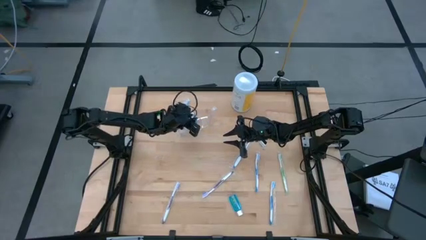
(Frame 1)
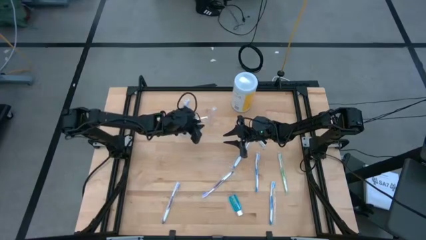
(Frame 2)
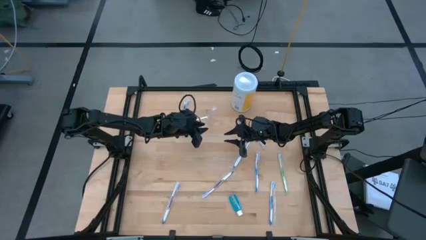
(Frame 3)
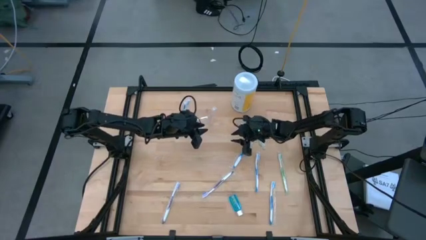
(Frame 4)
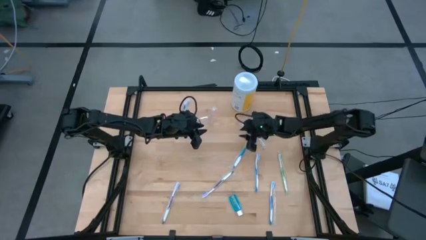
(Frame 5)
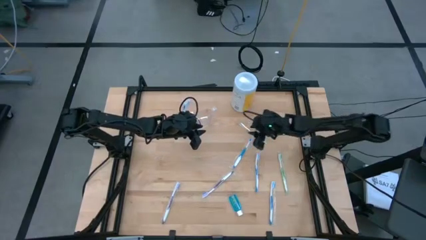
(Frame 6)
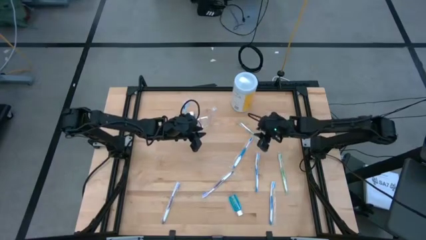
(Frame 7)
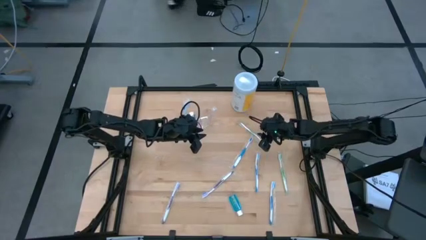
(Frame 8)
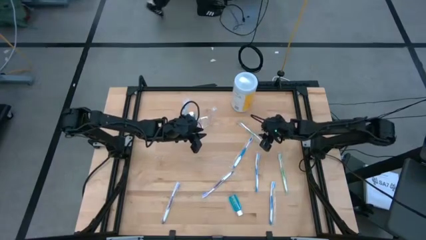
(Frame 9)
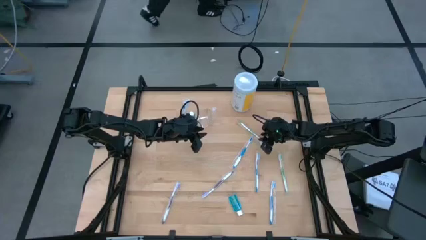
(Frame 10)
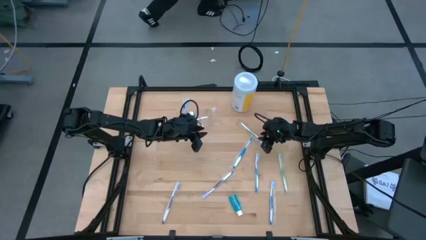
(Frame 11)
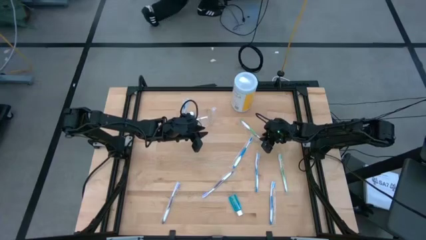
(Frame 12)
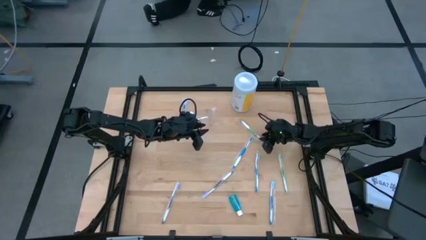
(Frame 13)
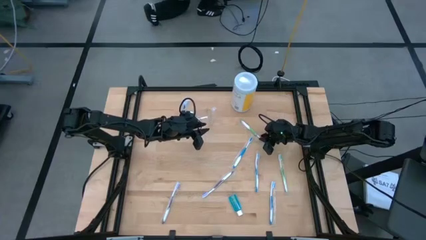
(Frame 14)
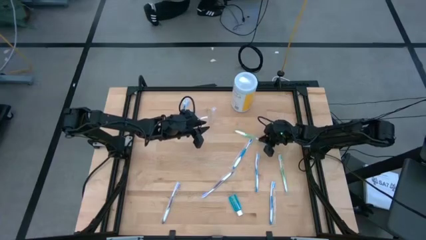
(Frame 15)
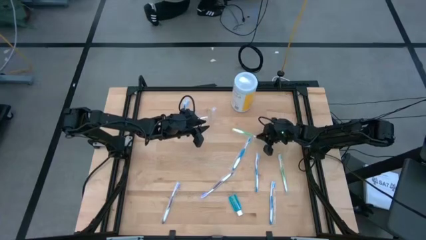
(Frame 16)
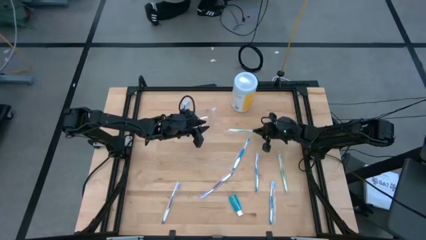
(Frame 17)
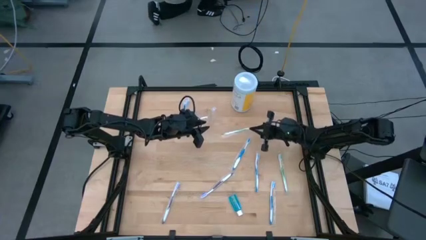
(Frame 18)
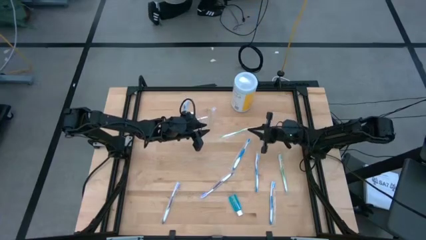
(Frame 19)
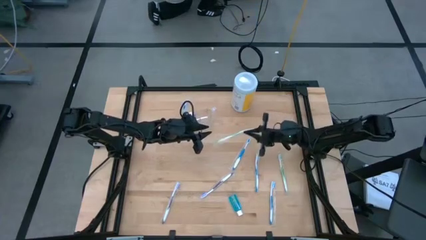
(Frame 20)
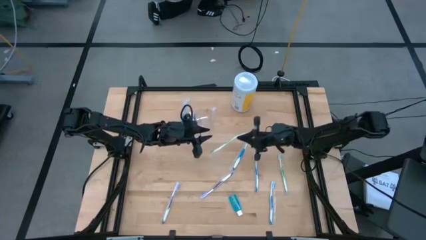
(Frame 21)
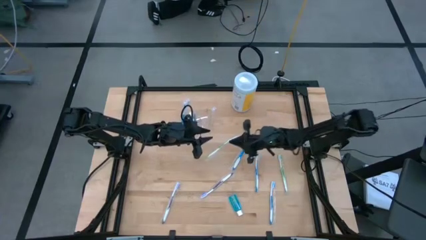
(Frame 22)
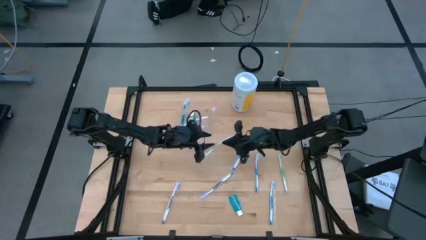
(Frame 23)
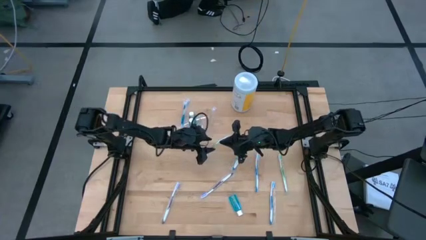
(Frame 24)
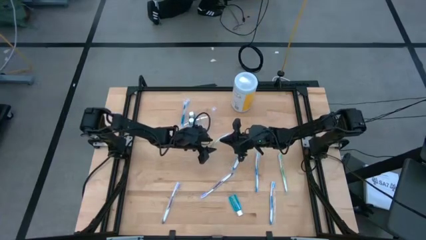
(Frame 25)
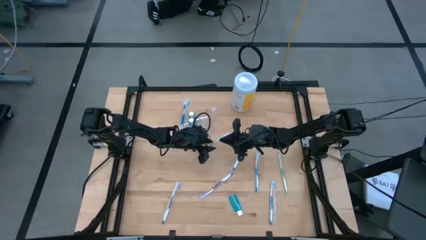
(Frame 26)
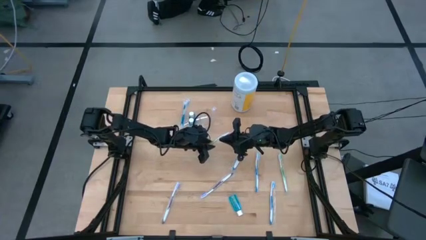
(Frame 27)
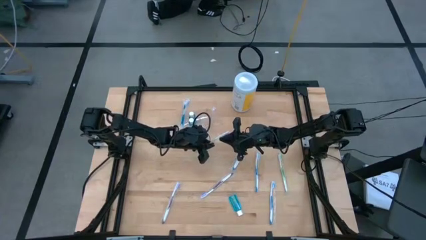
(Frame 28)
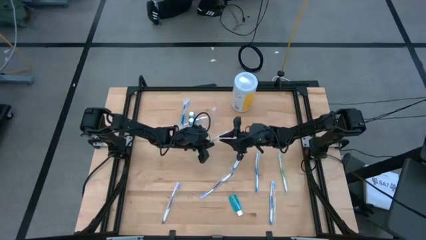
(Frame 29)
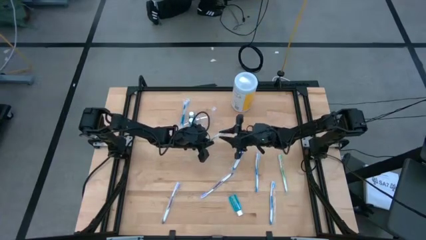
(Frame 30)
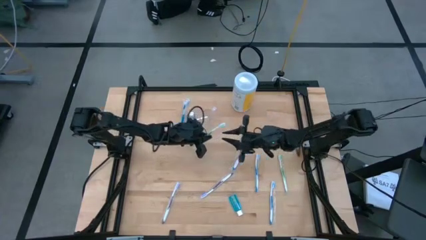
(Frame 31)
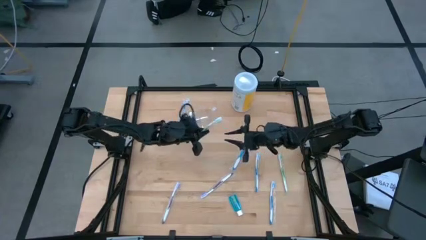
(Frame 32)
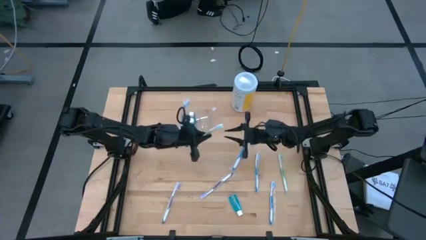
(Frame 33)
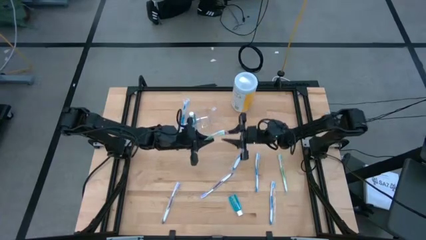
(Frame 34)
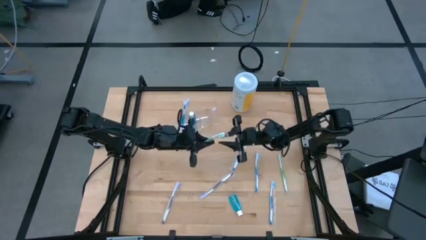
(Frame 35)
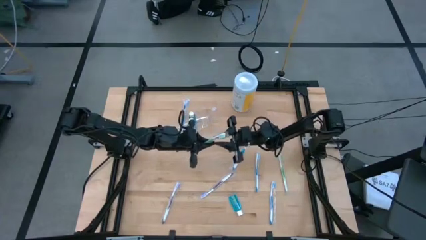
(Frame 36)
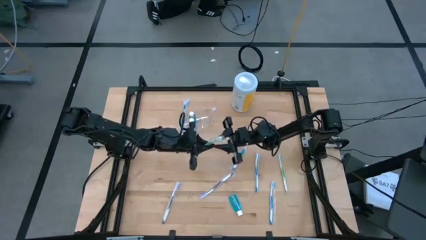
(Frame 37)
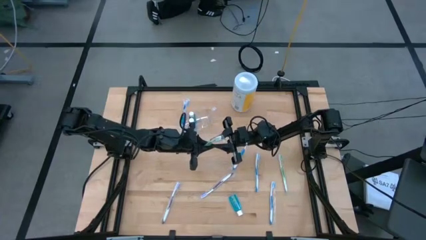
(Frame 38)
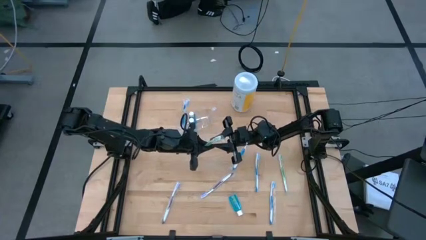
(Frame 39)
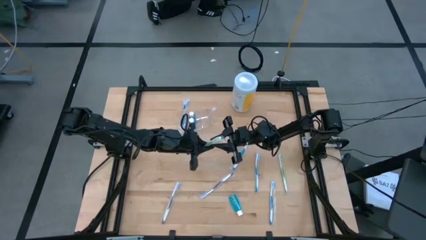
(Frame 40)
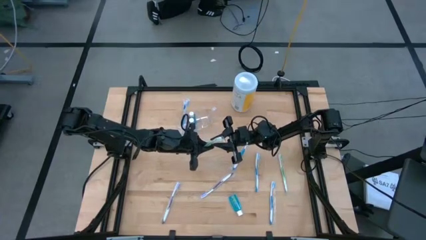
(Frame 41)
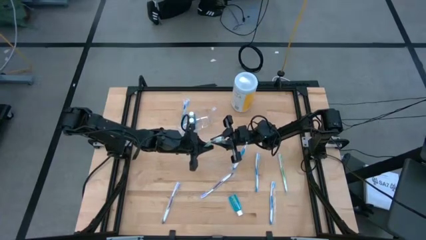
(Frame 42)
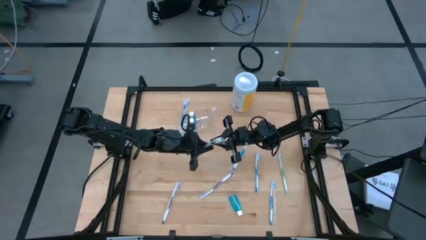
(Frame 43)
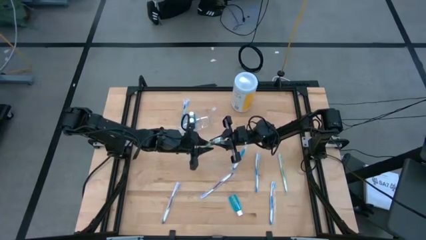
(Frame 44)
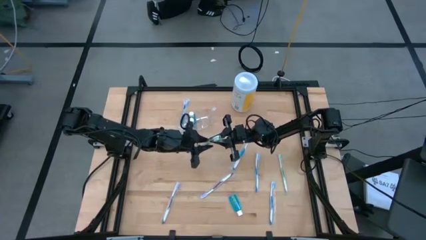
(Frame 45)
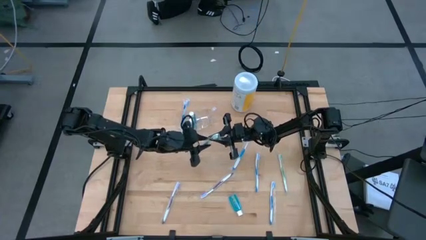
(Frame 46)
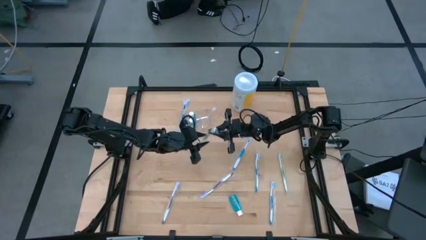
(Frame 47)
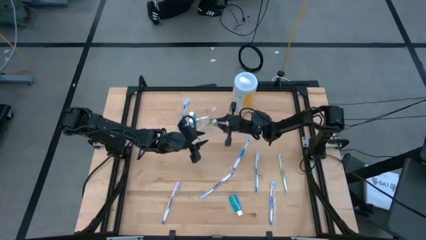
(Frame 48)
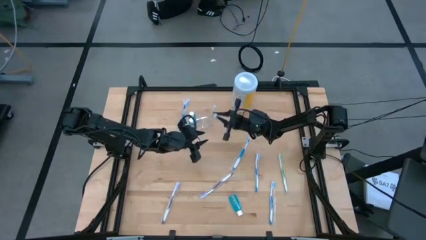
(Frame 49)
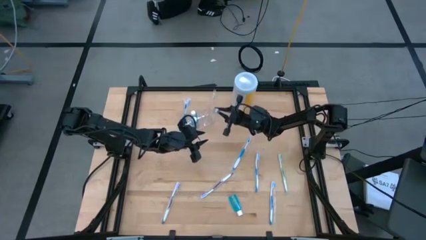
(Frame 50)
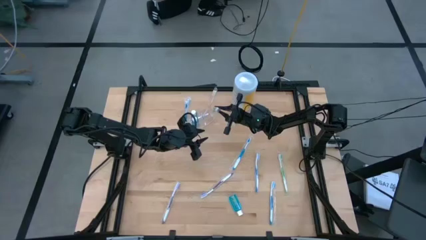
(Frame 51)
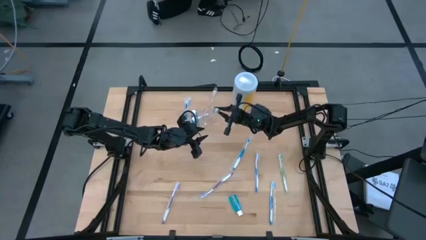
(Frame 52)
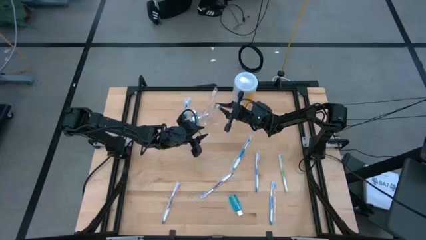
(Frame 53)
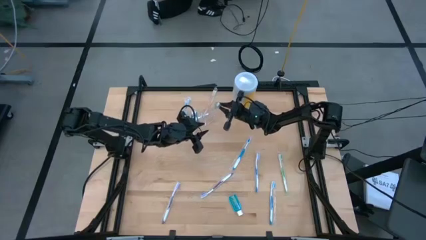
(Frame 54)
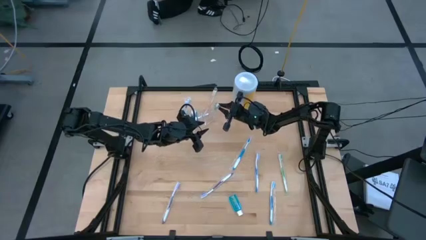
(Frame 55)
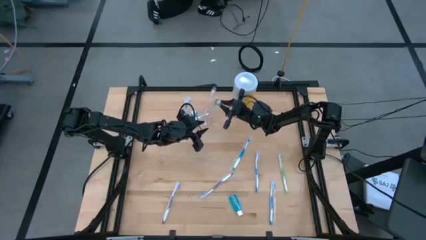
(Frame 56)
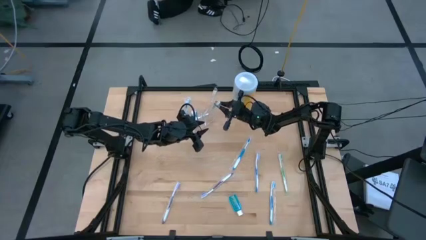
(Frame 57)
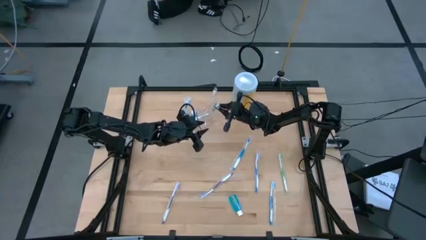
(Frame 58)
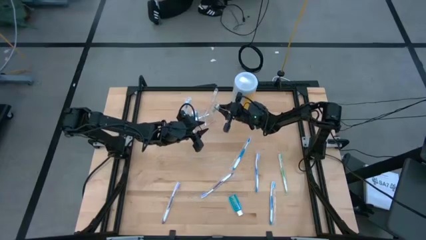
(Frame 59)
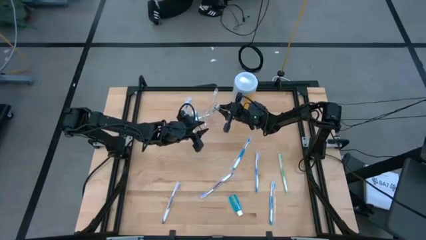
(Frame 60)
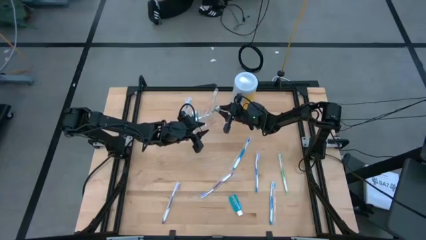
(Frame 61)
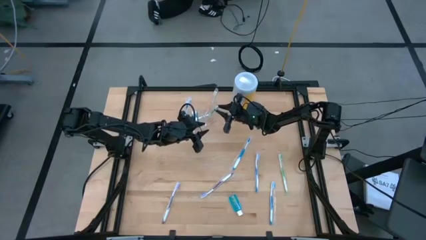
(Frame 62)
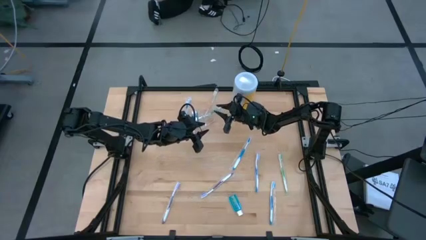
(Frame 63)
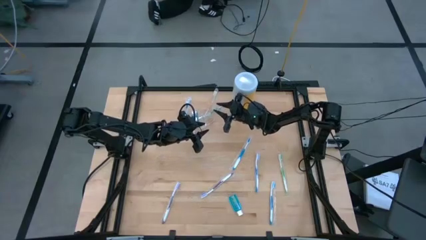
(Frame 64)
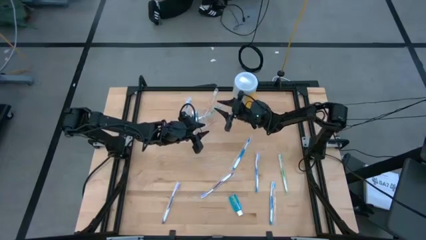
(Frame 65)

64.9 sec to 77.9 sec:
Task: Pick & Place toothbrushing station
Put the green toothbrush into the transparent organizer

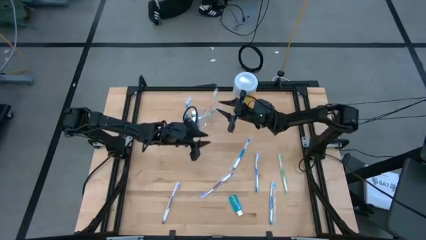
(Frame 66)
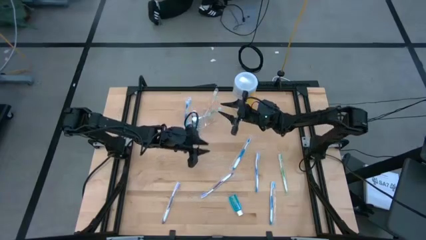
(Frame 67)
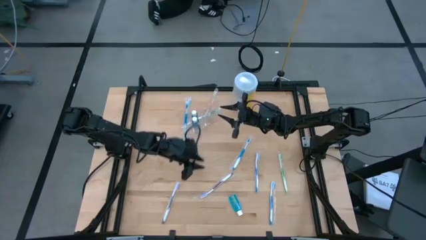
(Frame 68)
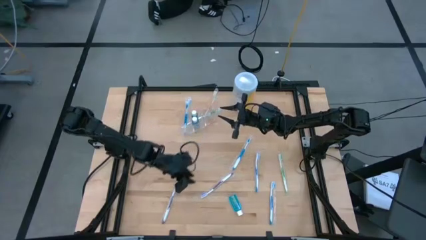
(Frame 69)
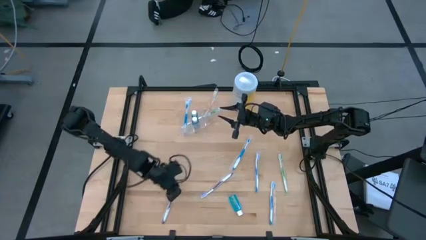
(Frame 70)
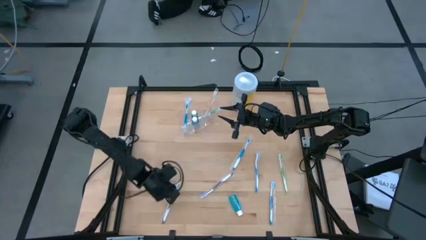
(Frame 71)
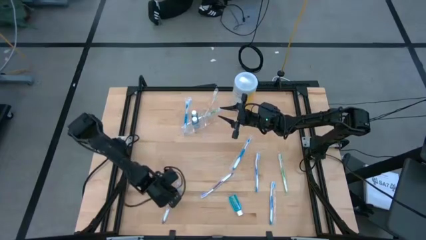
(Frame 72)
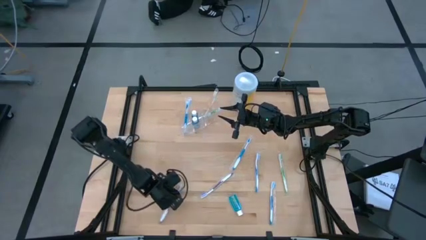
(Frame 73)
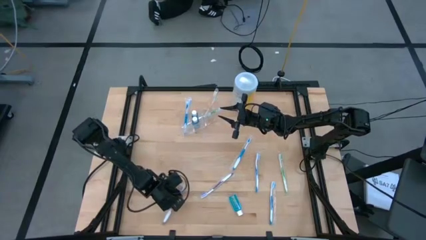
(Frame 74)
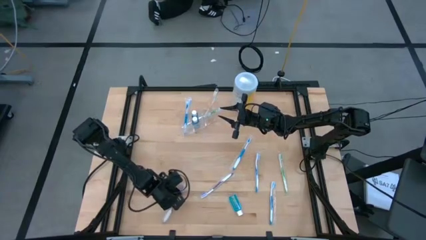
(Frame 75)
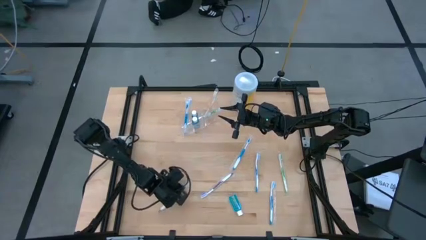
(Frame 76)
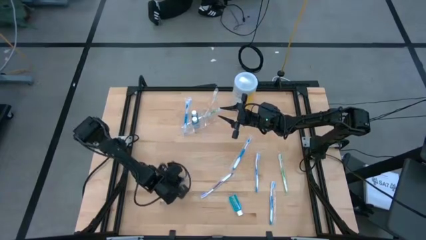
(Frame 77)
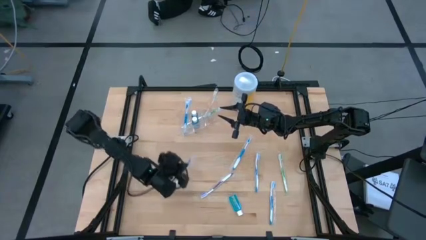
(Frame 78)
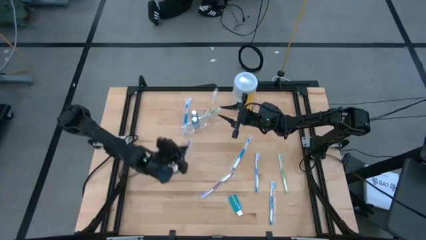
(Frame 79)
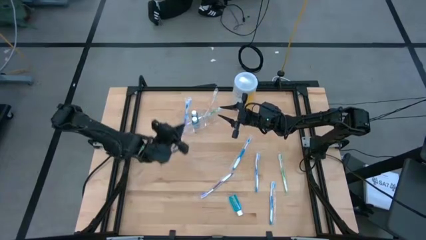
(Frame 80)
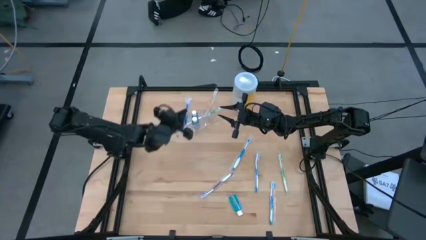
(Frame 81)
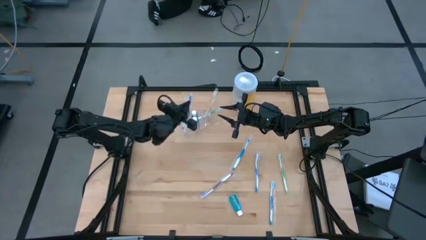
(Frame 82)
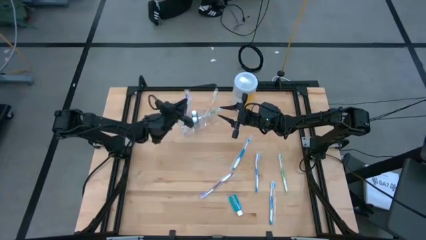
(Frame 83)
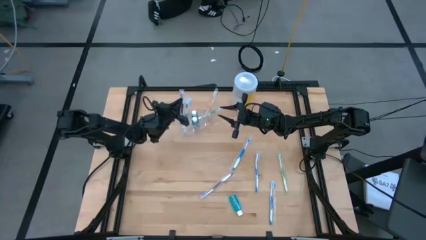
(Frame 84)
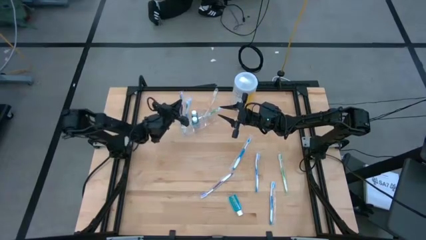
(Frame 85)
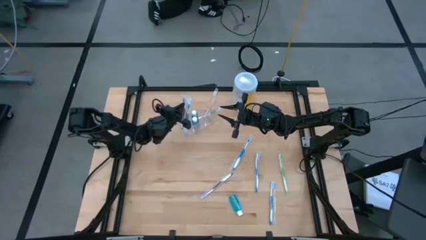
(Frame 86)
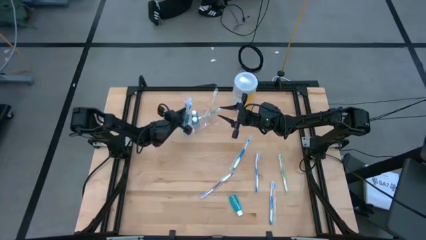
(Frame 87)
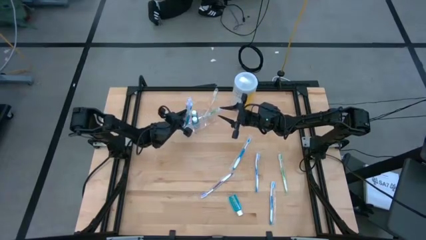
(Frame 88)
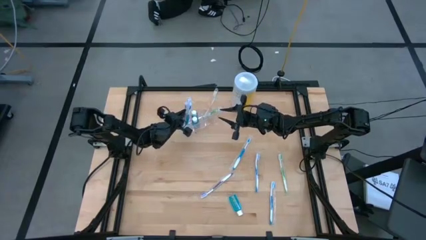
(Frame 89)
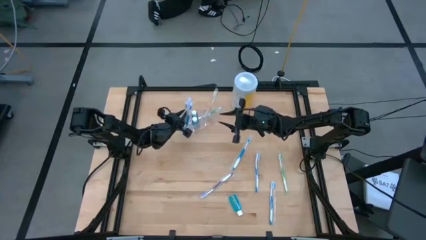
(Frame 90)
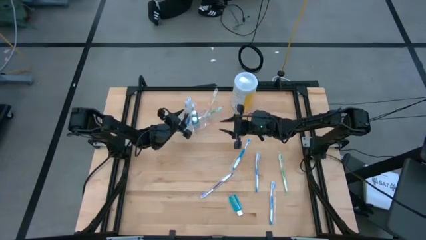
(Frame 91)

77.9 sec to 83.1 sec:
Put the purple toothbrush into the transparent organizer
